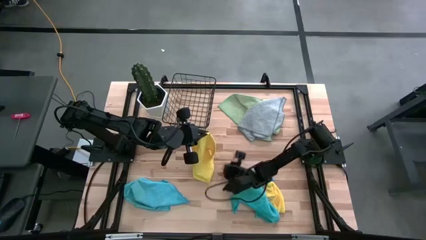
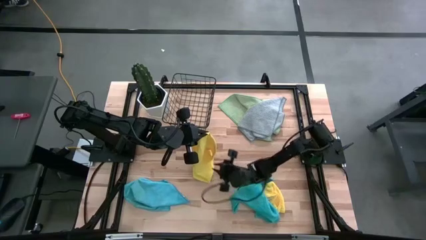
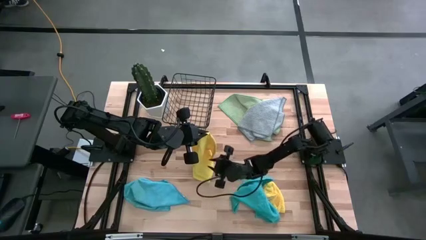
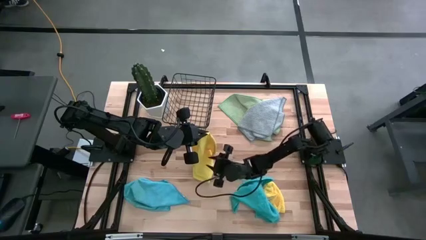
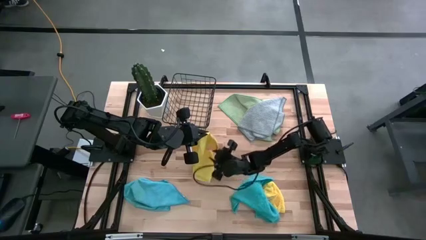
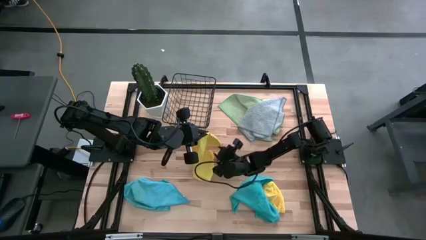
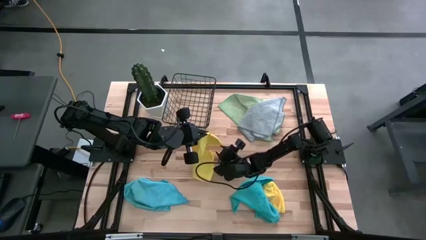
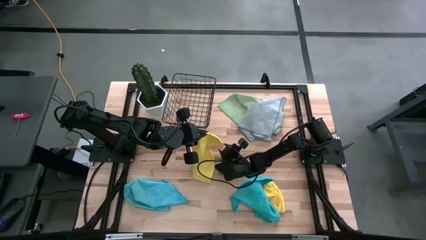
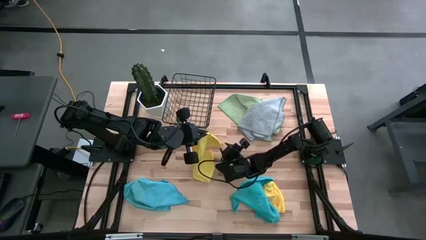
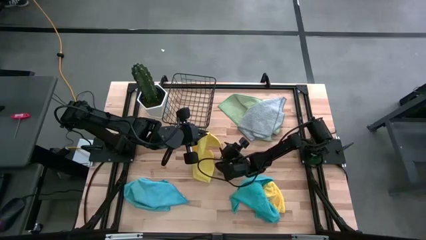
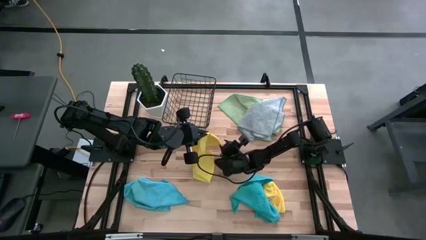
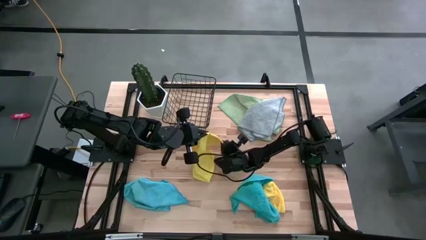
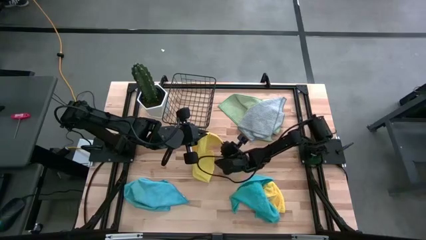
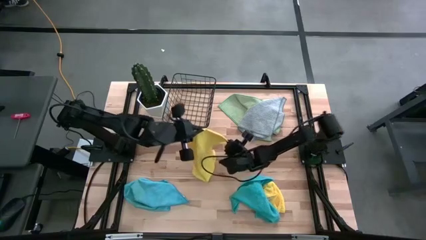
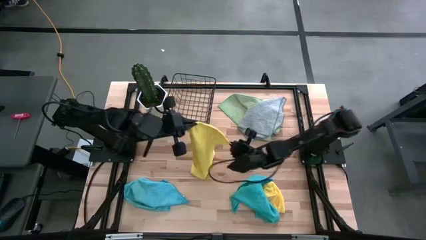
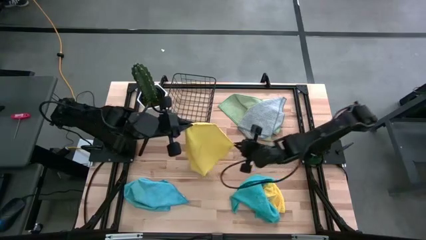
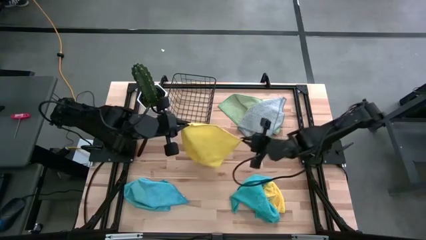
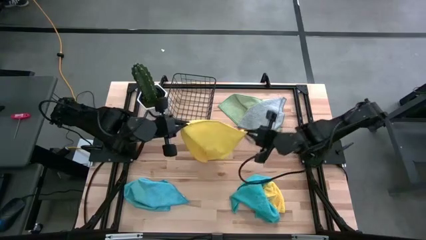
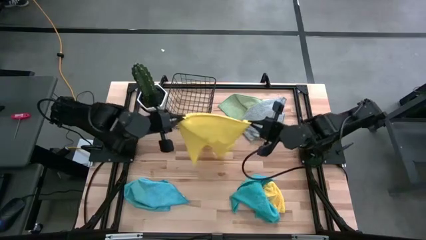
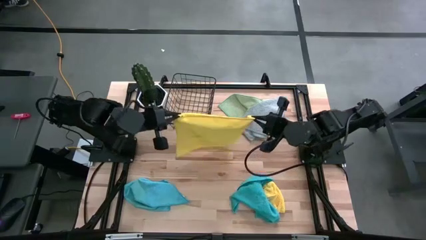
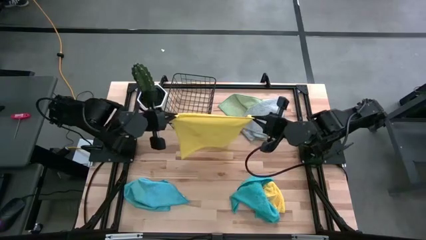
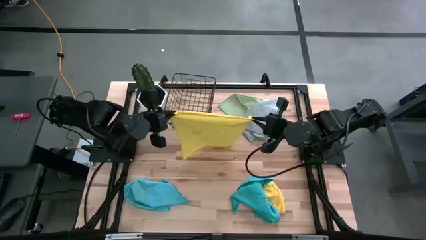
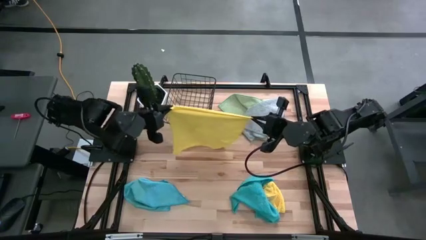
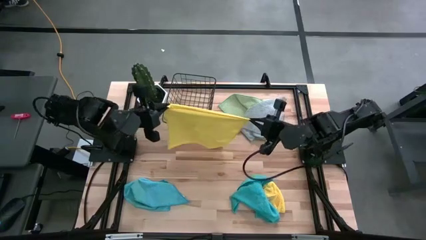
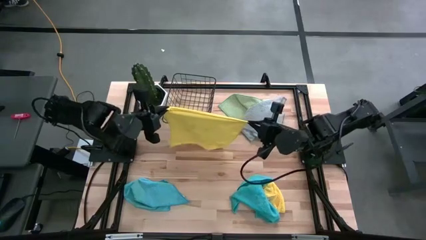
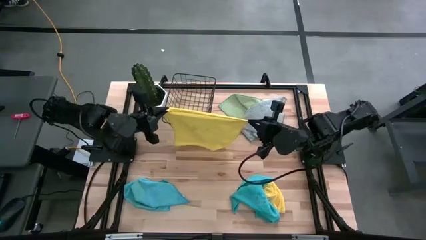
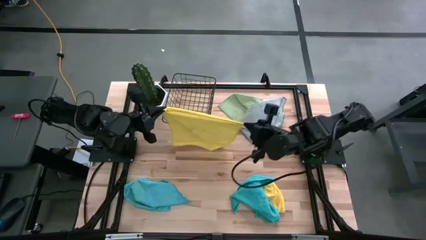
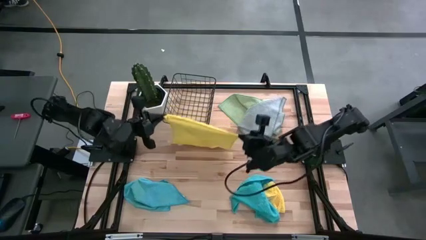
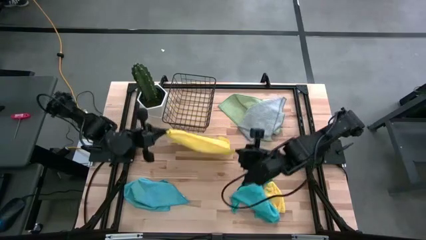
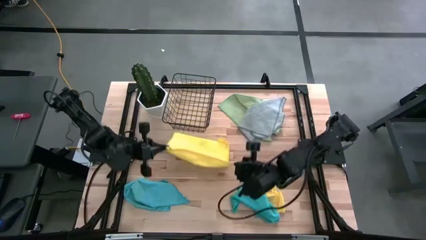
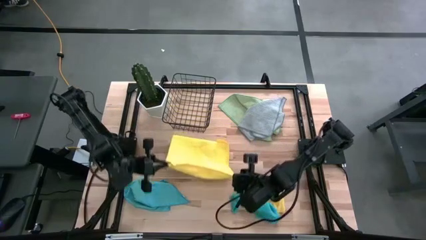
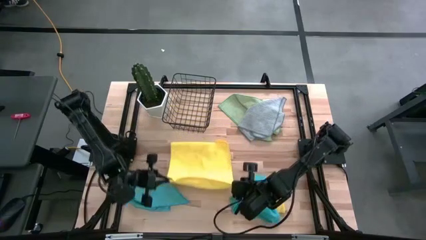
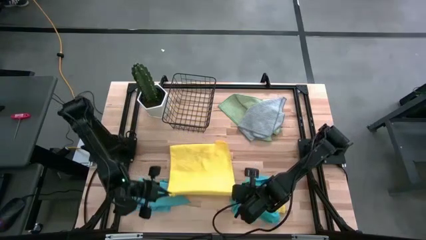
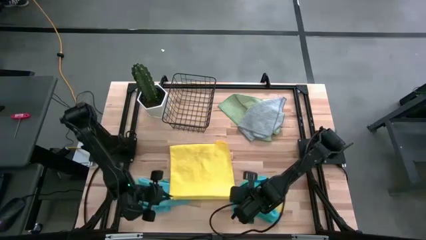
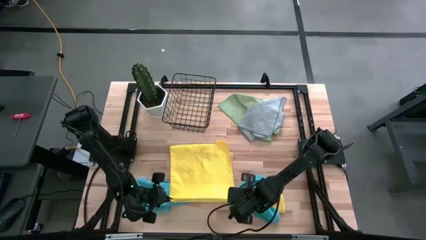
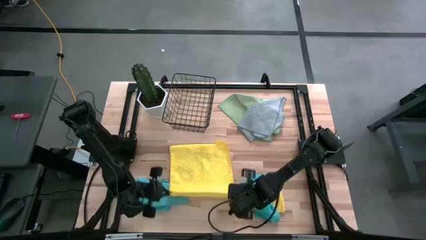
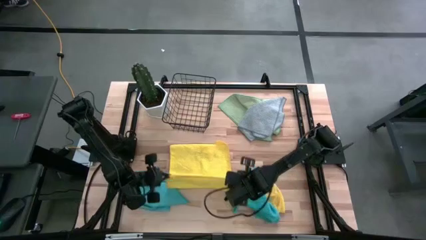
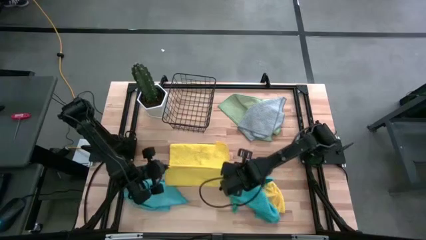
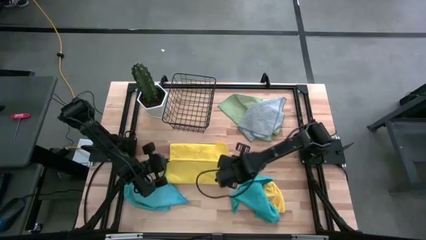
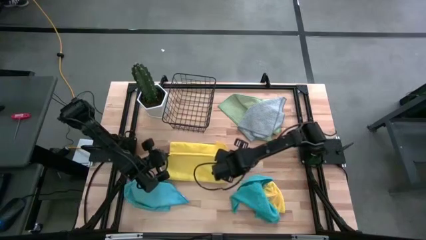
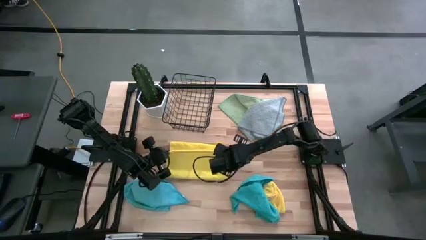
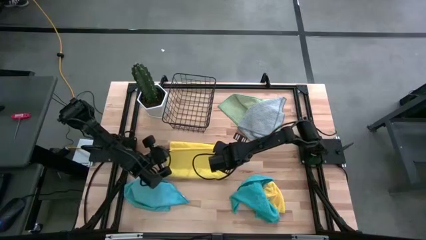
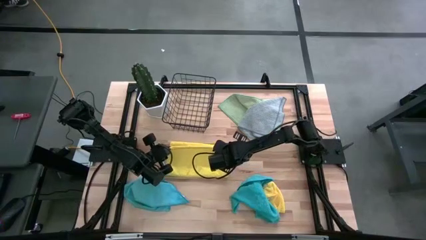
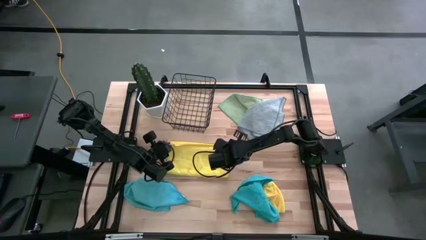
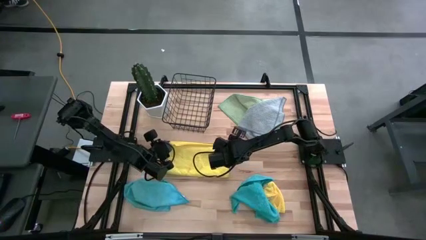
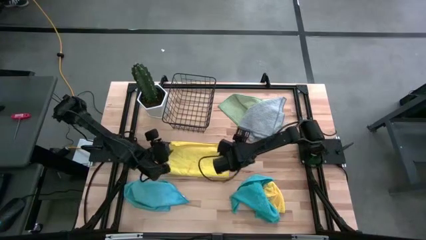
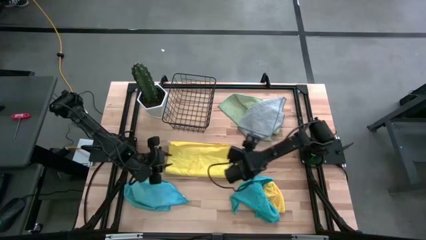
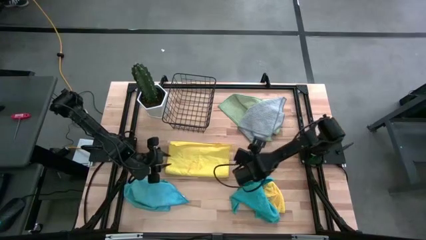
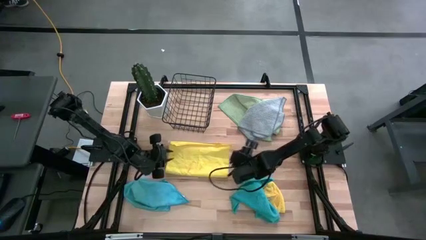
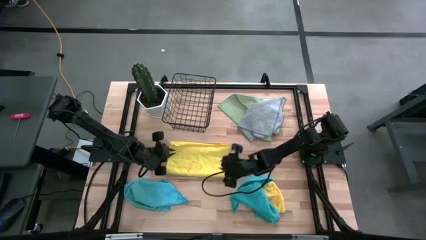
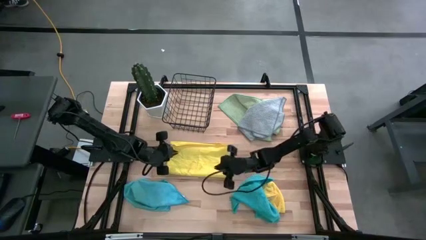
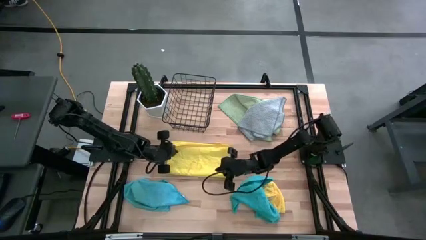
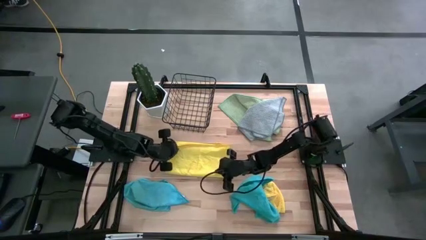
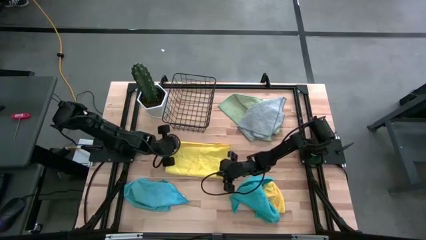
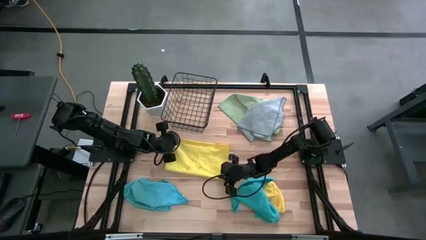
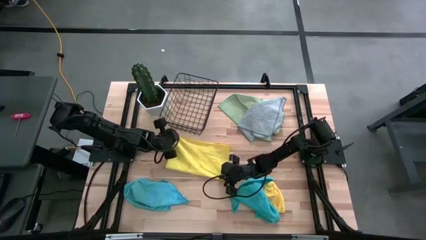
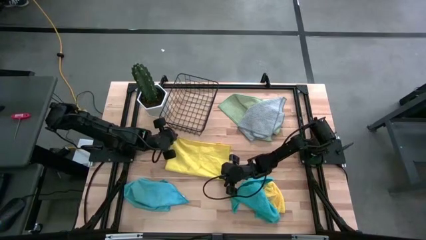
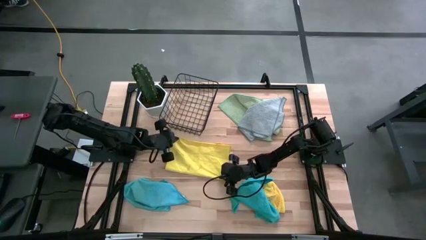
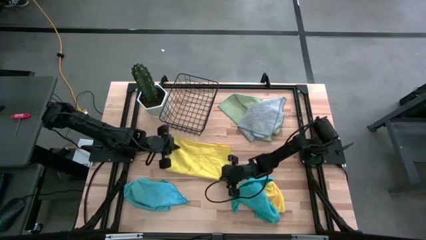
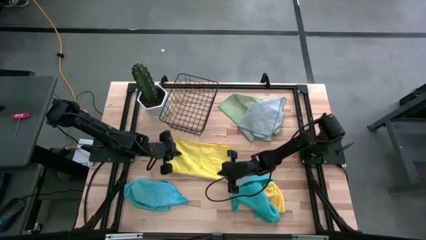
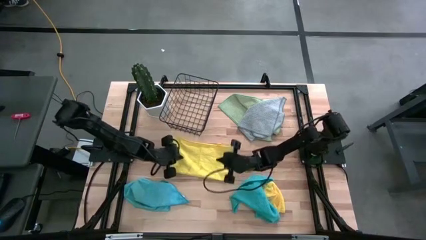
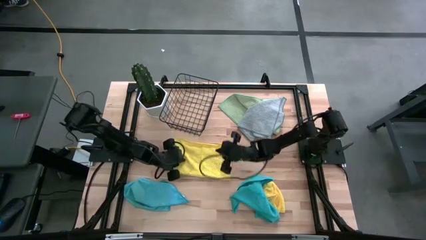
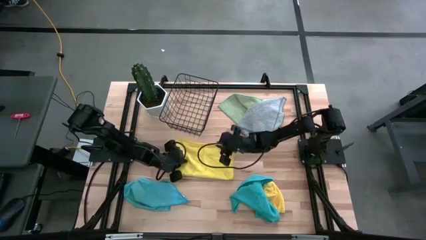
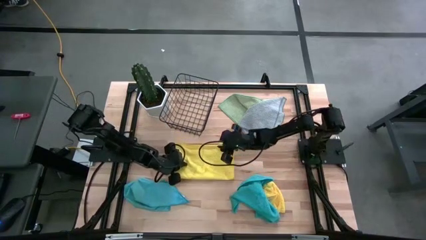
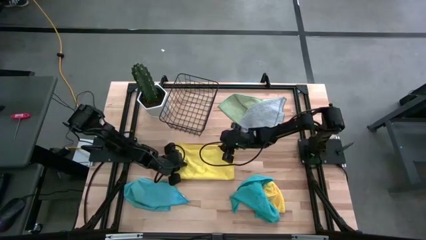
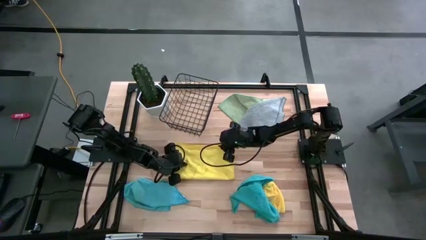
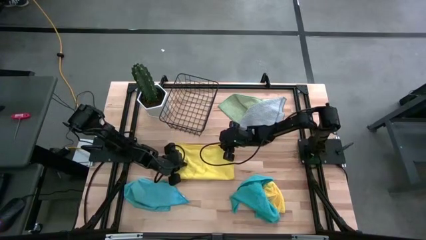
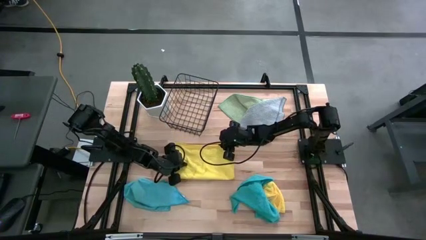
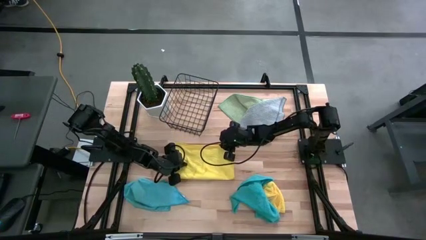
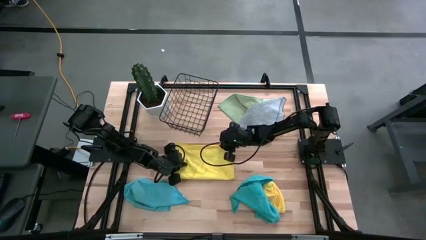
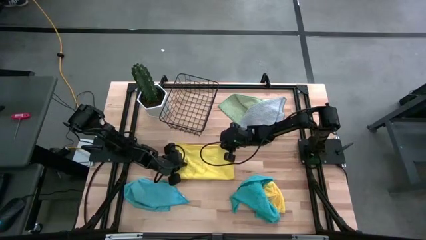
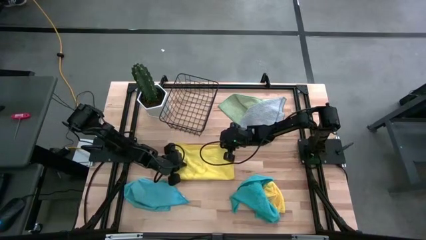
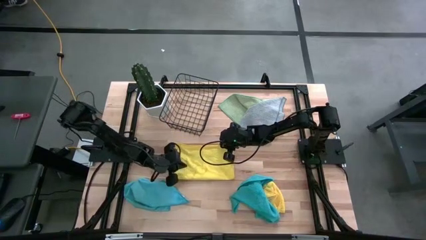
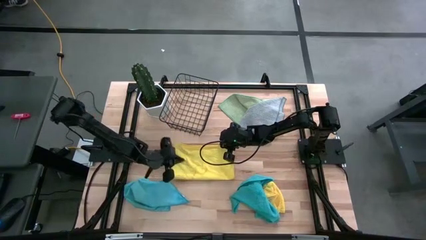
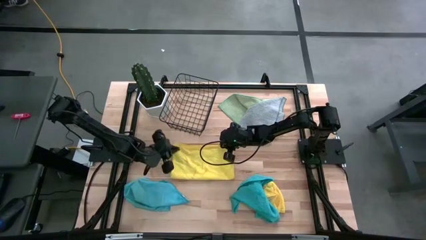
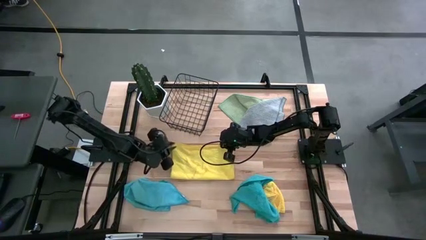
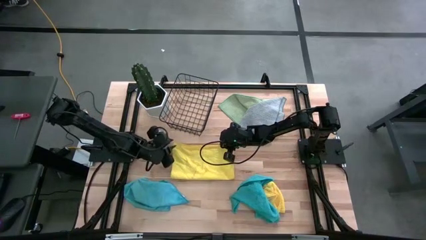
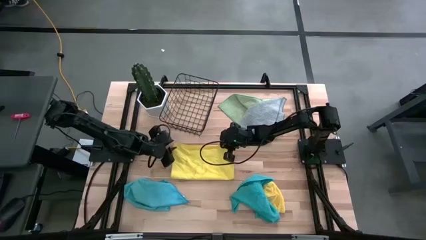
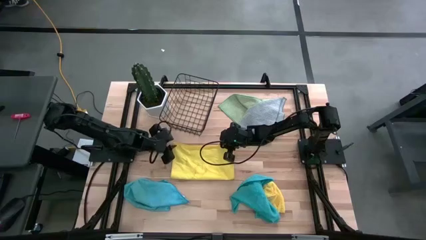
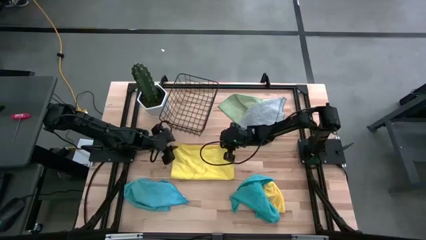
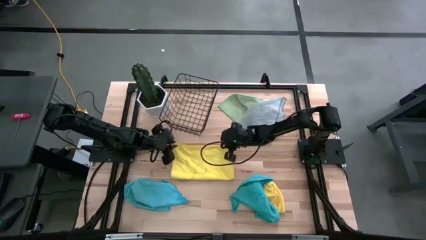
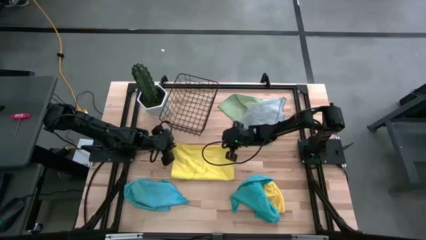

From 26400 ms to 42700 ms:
Task: Fold microfiber towels
Fold the left yellow microfiber cloth

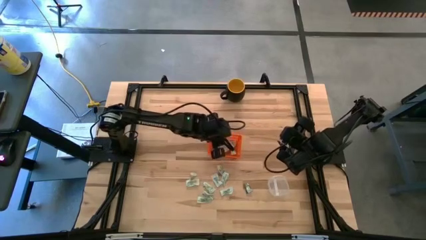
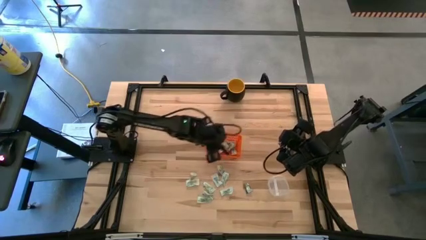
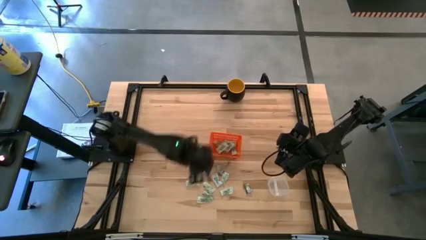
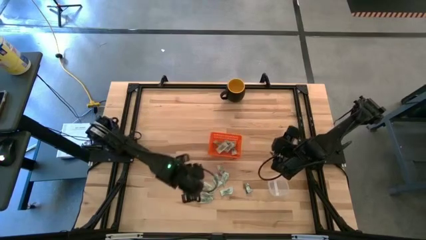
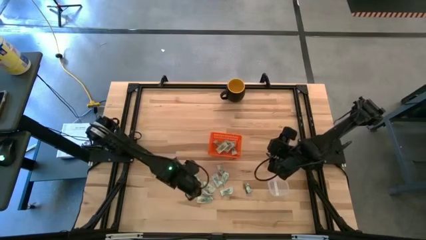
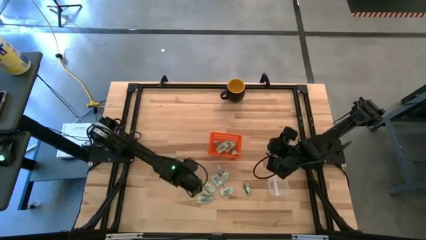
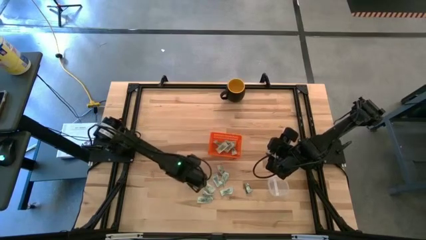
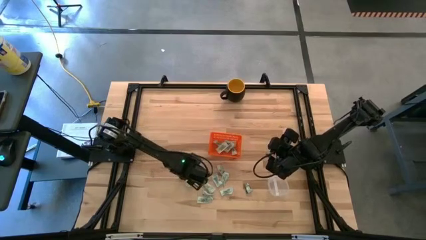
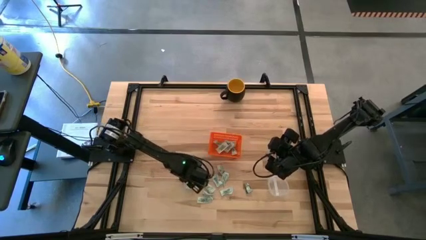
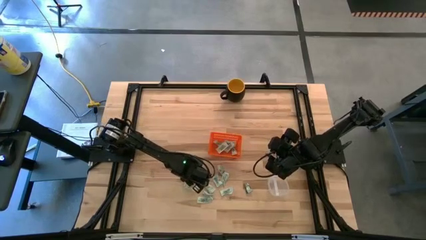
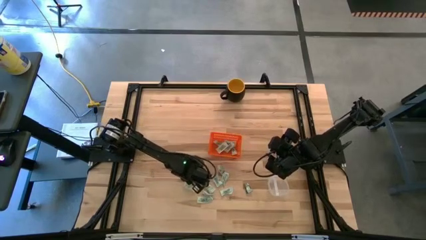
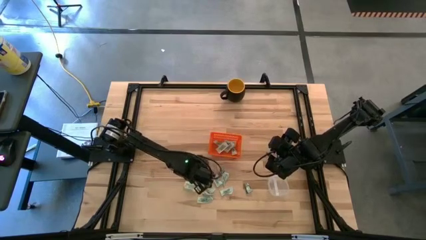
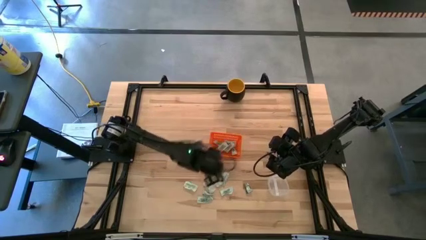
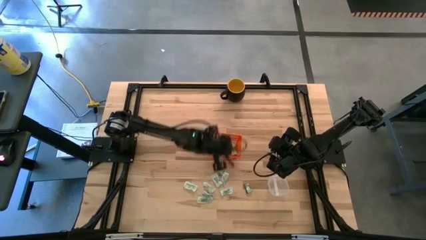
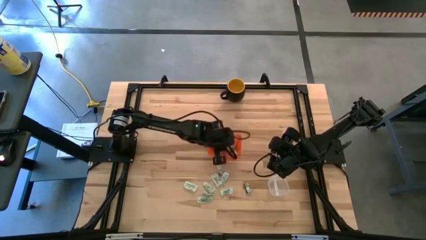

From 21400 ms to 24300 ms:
Task: Pick and place items into bin
Put the light green stevia packet into the orange bin
